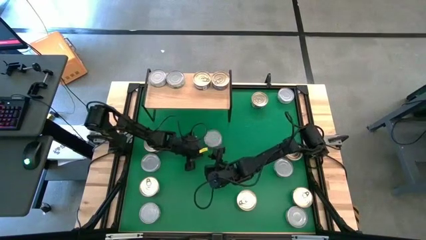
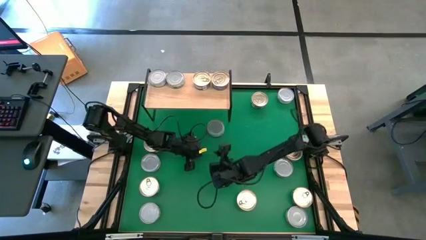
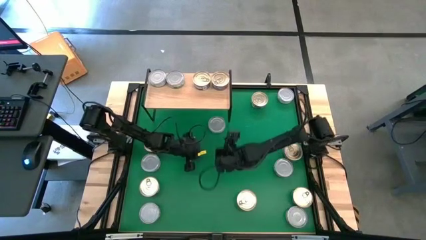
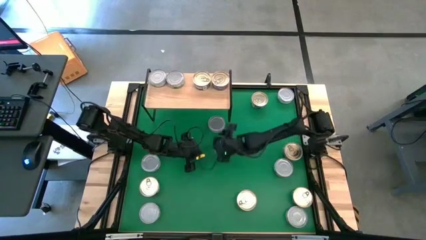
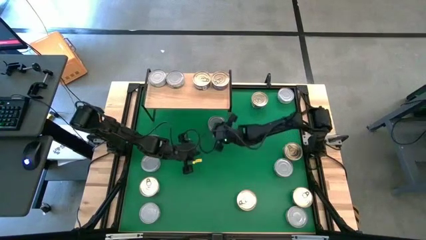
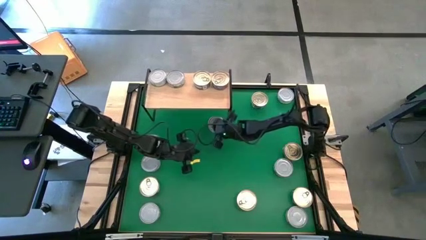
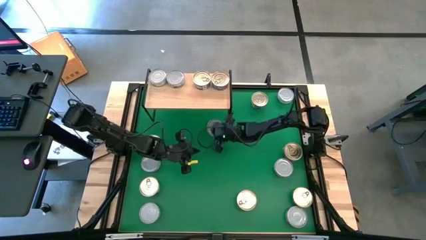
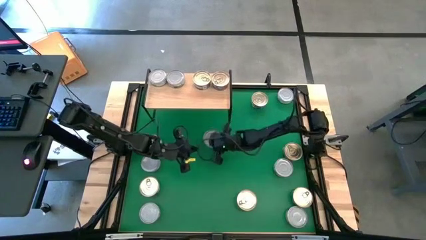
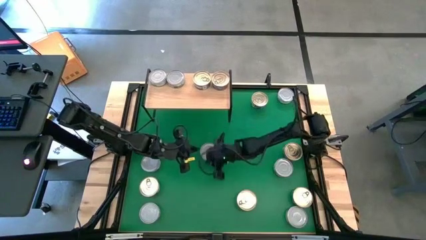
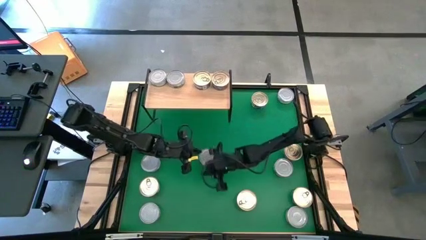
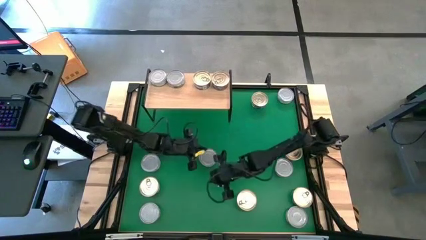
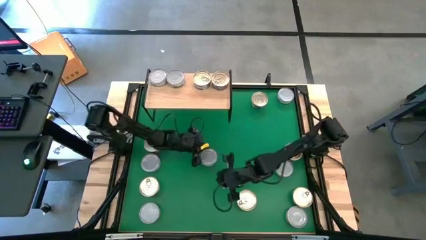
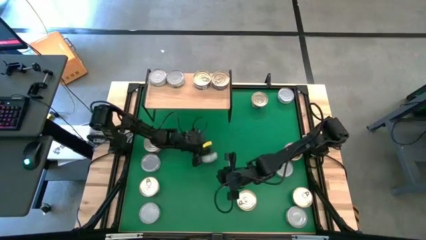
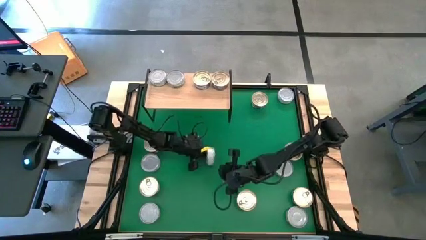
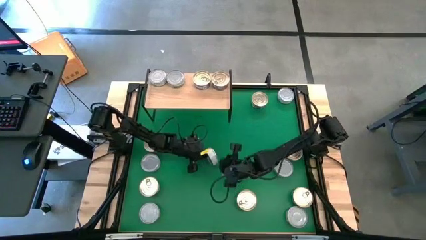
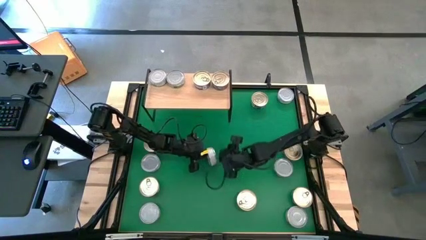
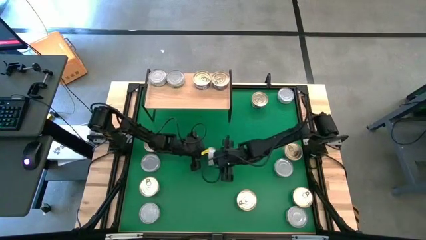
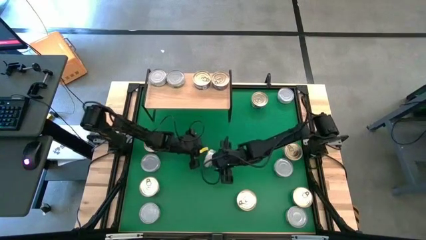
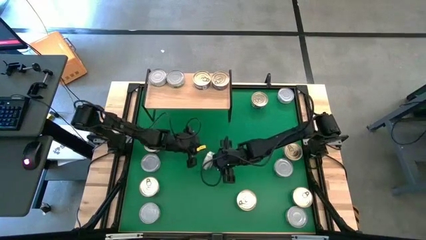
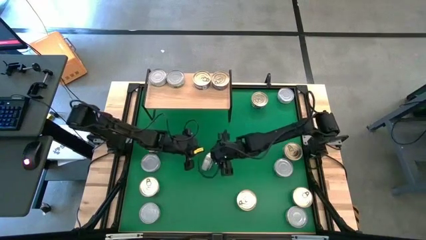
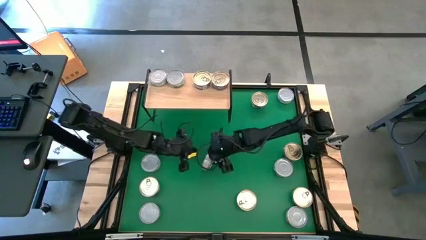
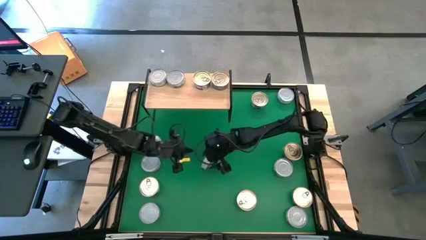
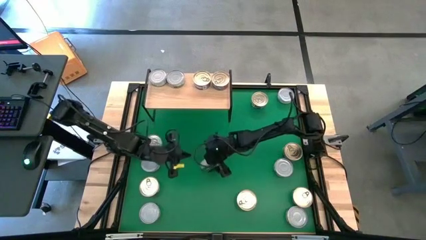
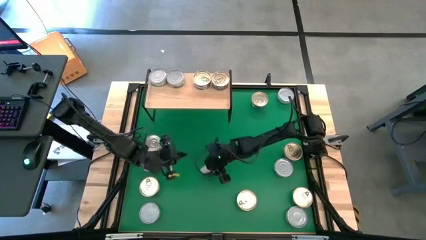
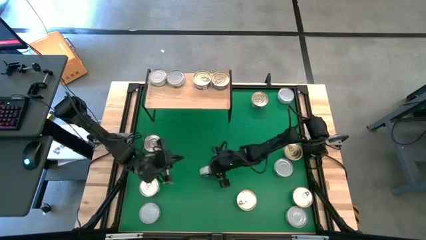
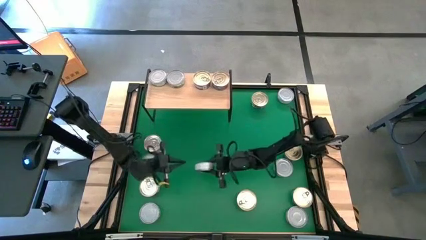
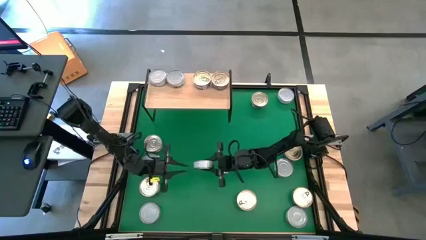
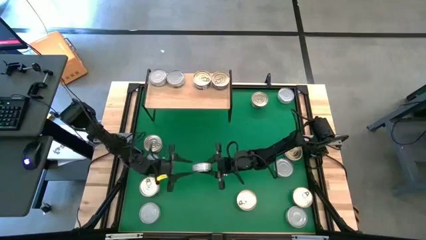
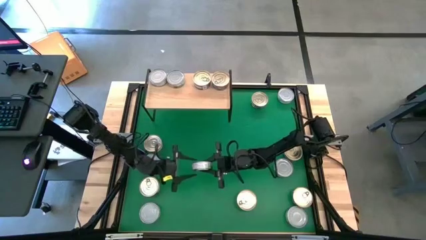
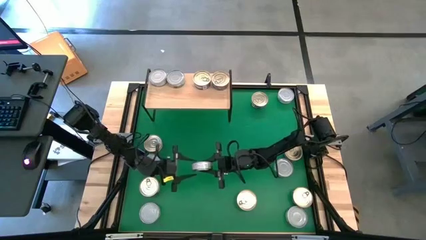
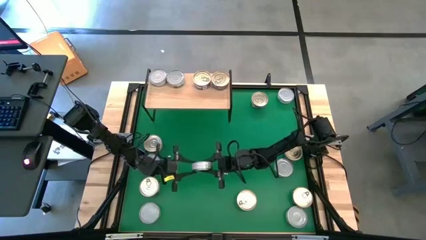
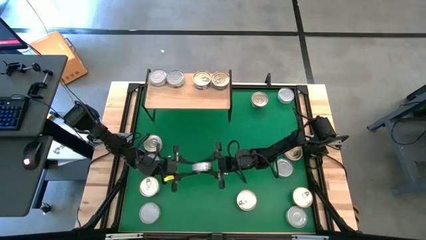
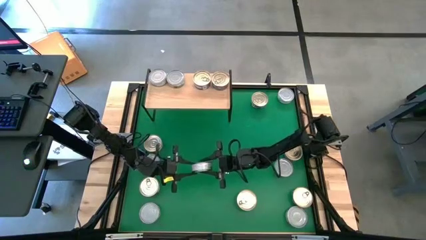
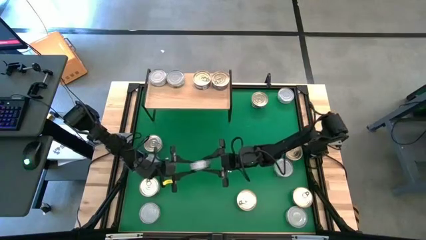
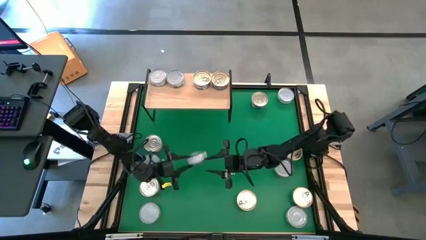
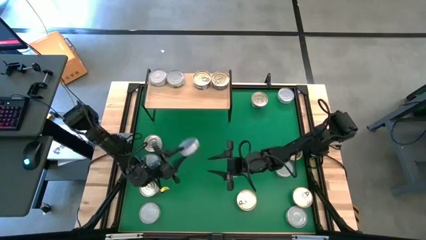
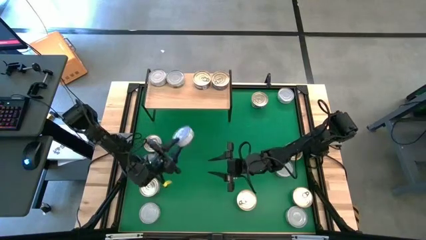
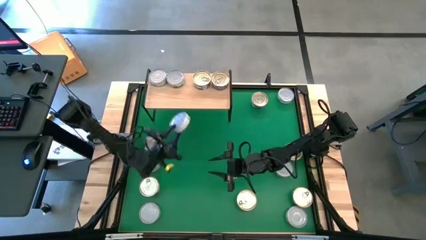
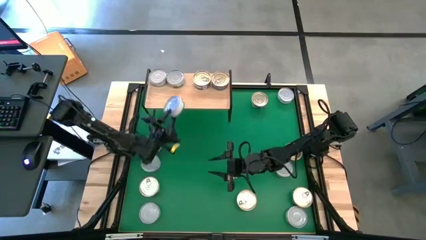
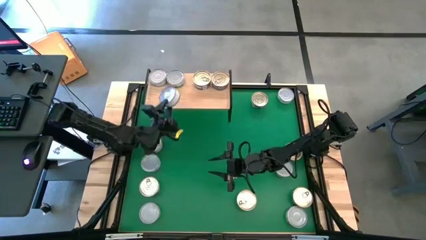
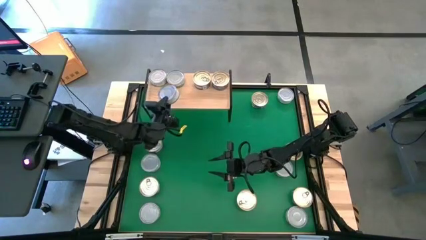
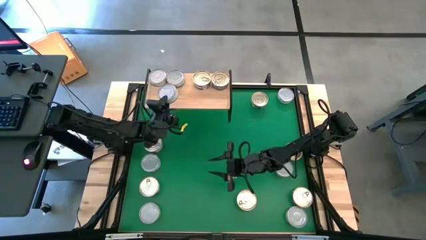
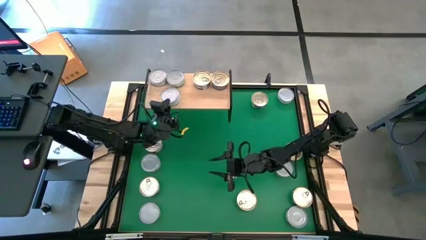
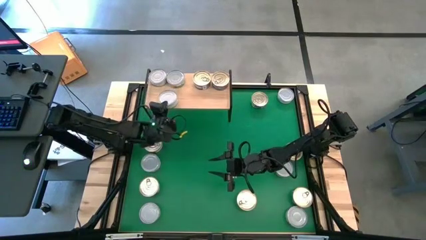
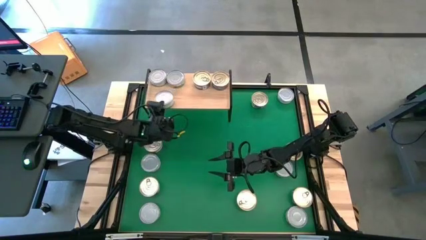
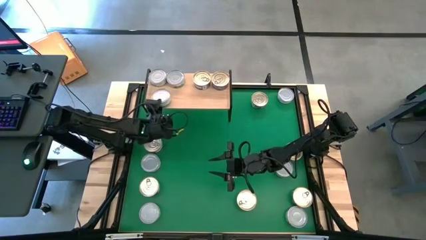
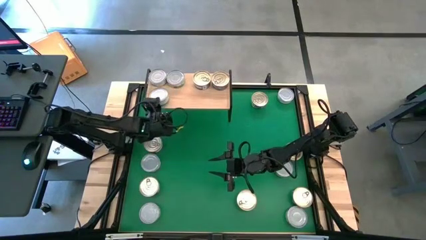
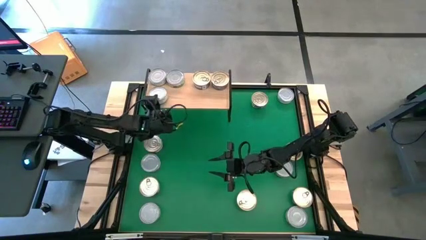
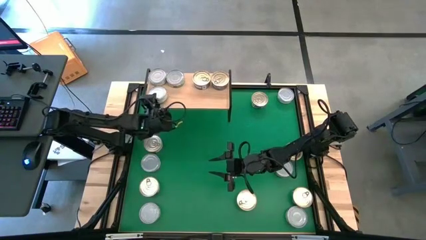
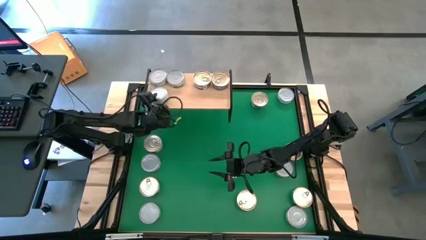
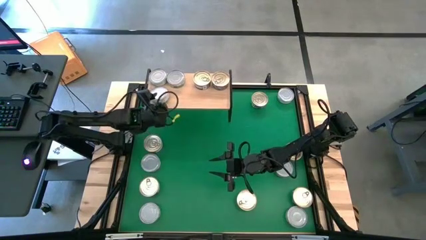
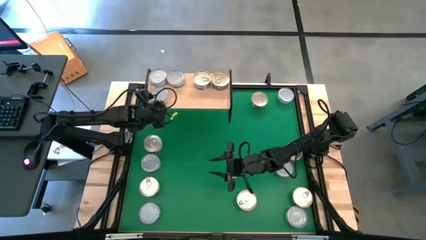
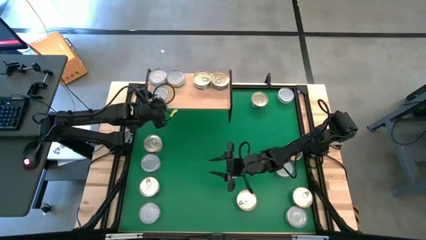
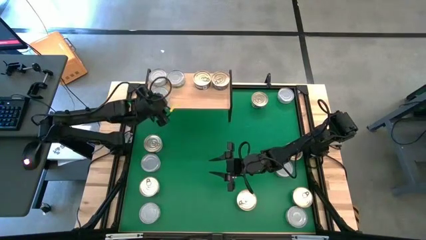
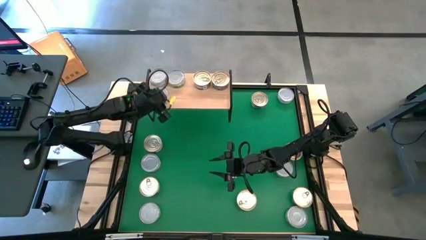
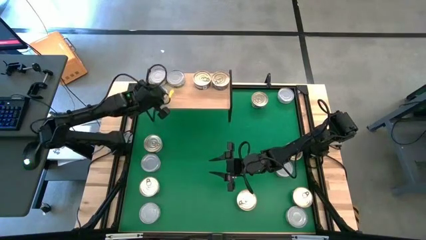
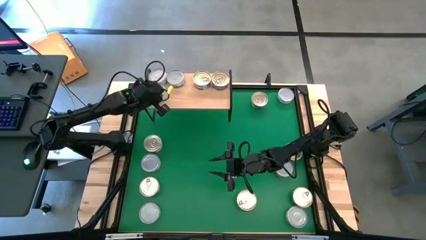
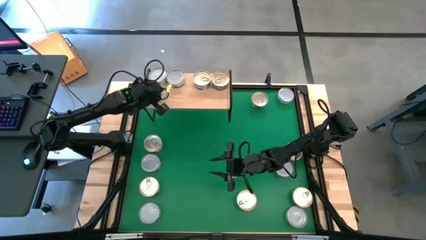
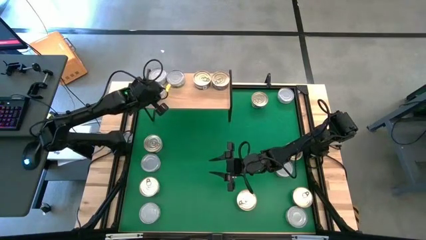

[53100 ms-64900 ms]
Task: Stack canned seafood by type on shelf
Put the green tuna can on the shelf

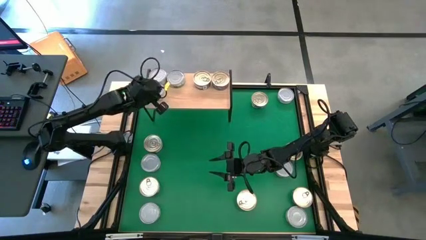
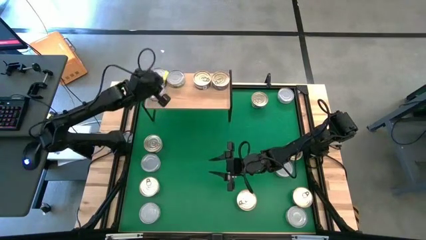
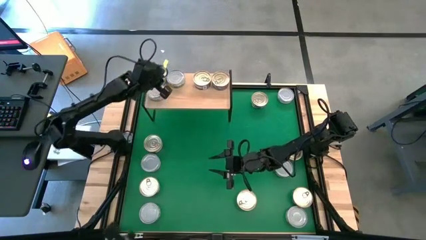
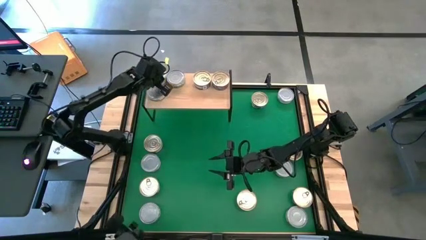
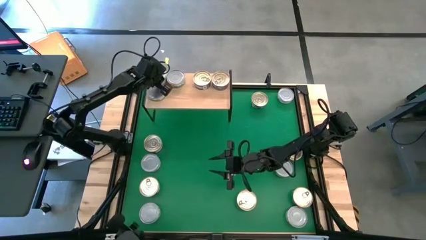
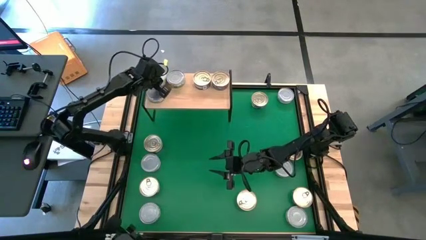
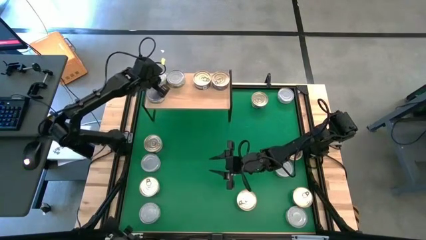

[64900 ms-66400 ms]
Adjust the green tuna can on the shelf
